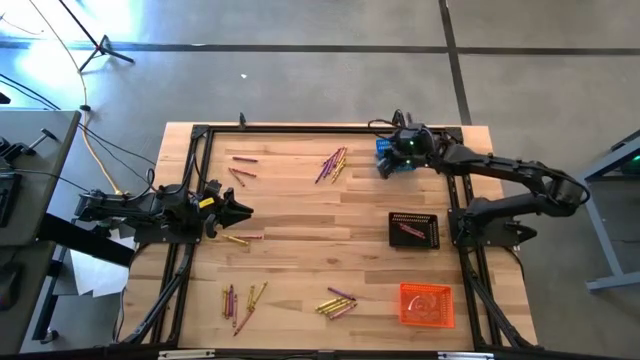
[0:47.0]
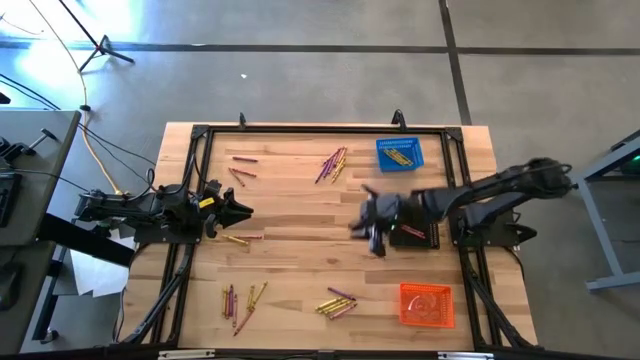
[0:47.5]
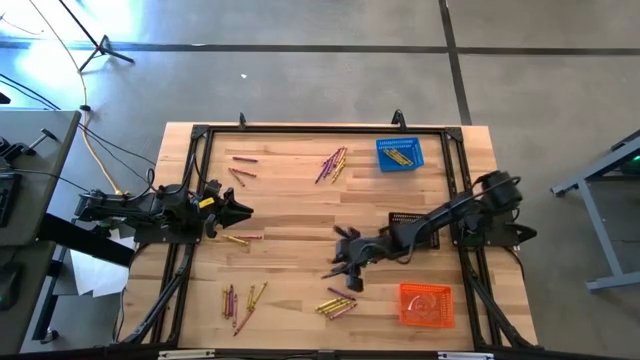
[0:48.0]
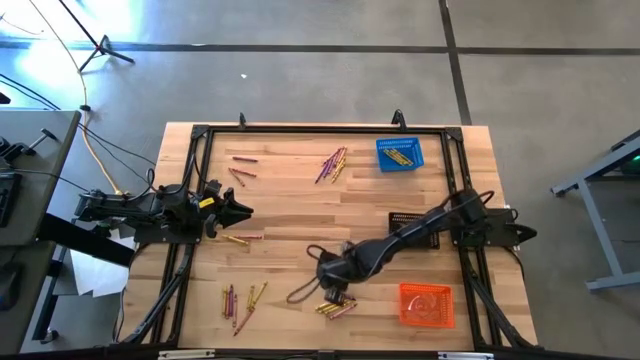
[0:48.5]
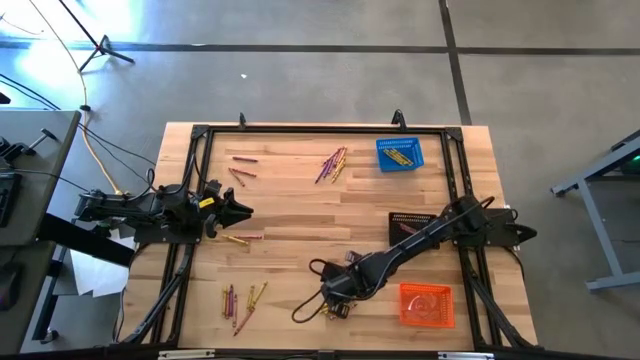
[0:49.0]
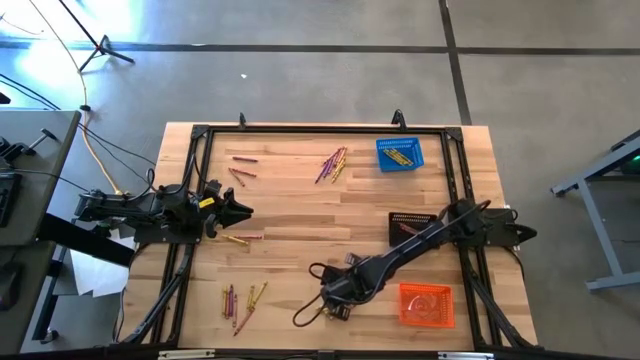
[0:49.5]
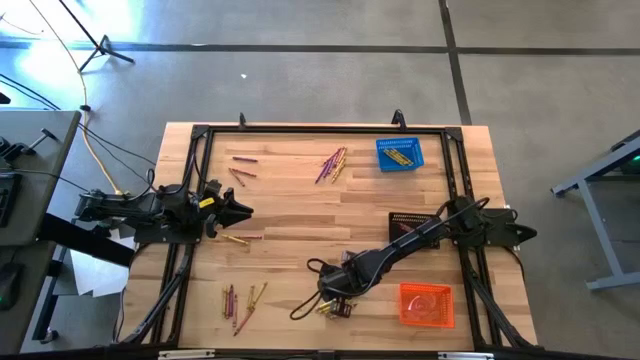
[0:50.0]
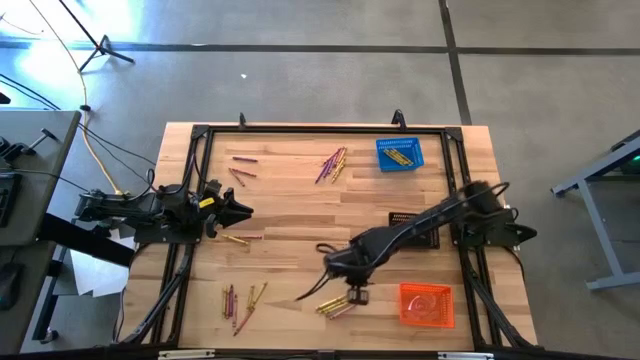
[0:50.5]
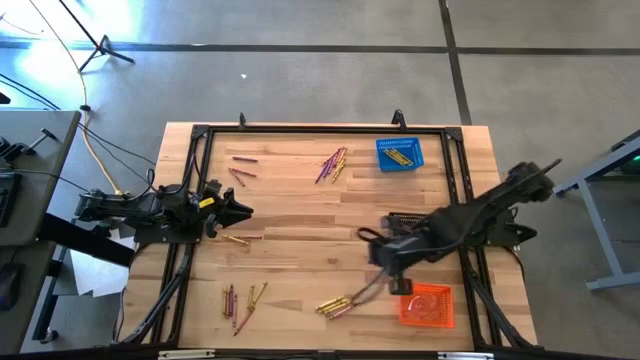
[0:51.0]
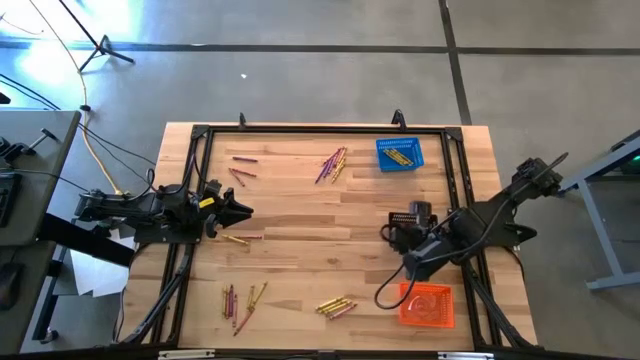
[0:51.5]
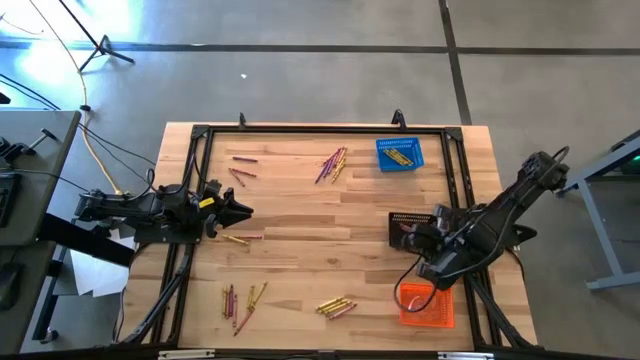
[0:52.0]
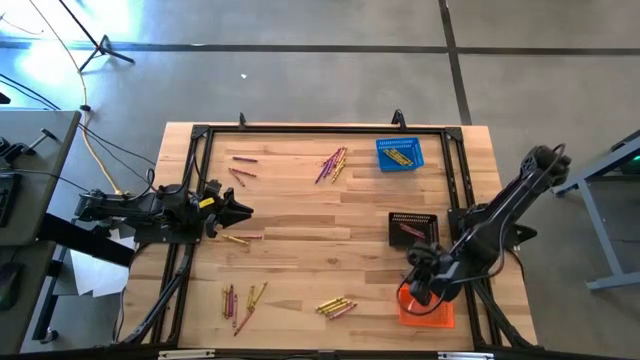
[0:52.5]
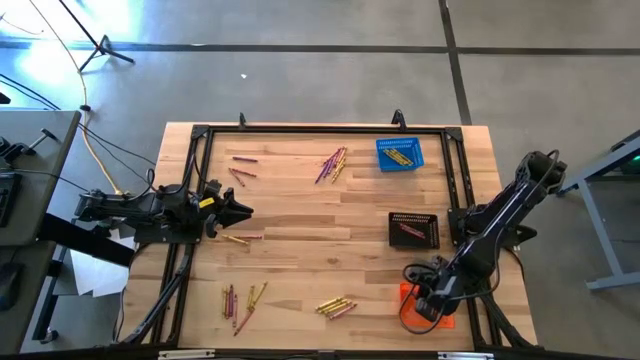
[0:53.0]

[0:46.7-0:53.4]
Task: Sort crayons
Put the violet crayon into the orange bin

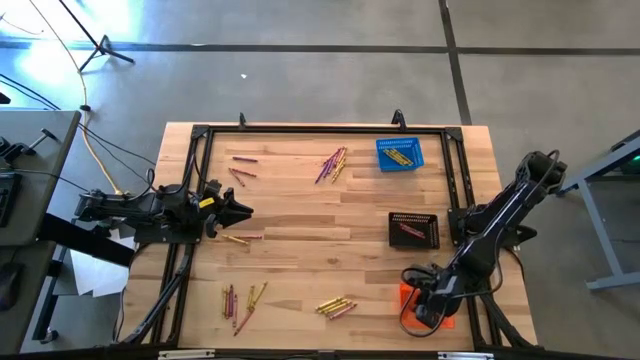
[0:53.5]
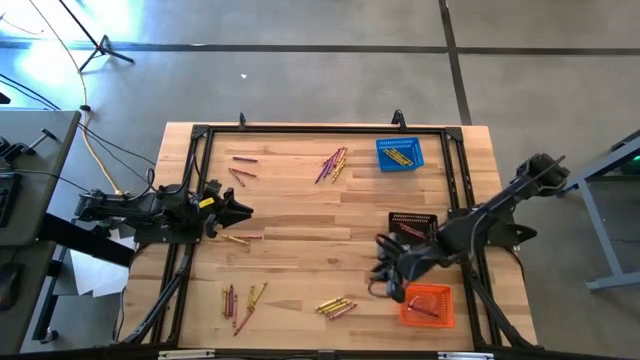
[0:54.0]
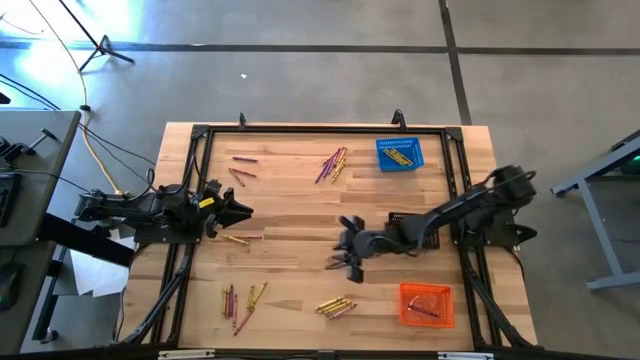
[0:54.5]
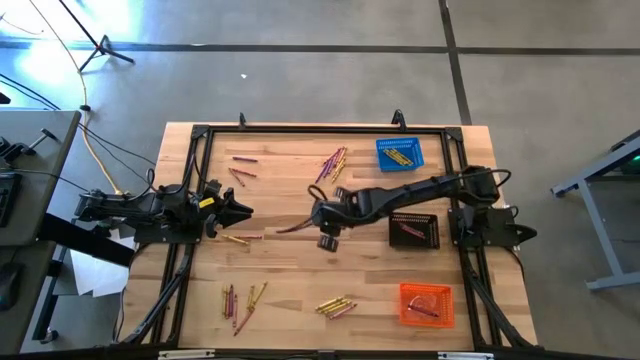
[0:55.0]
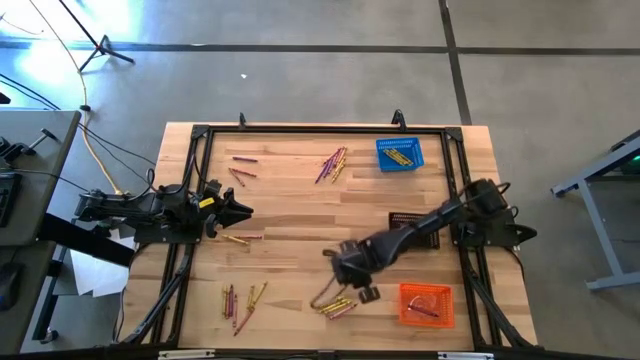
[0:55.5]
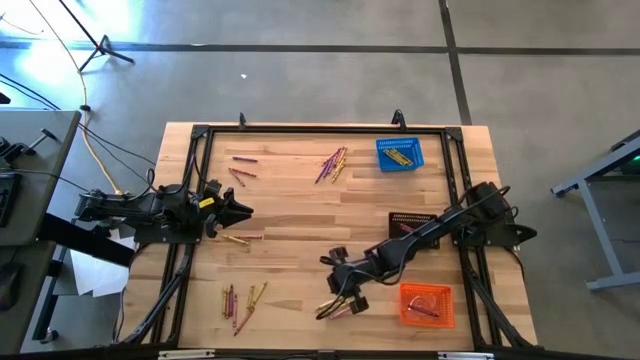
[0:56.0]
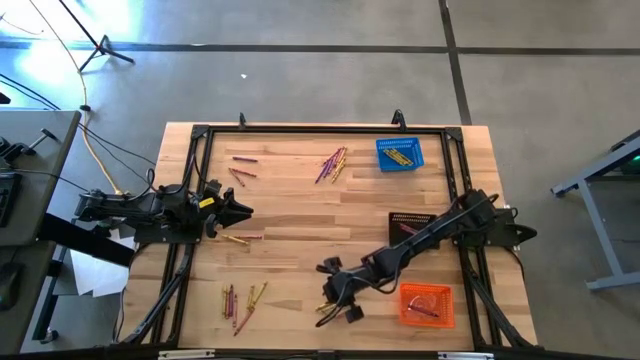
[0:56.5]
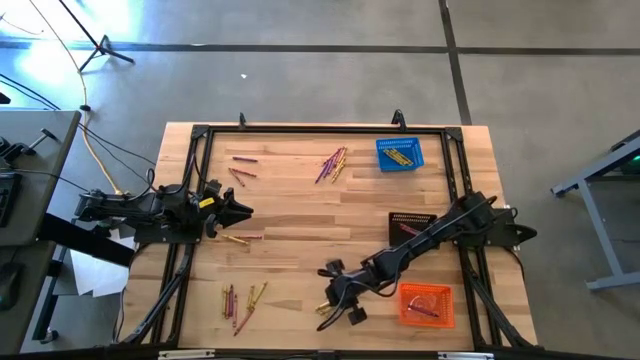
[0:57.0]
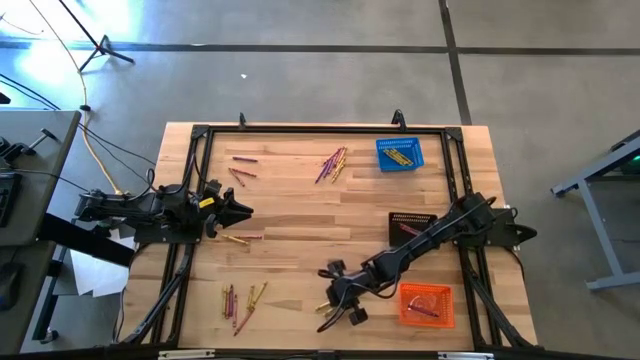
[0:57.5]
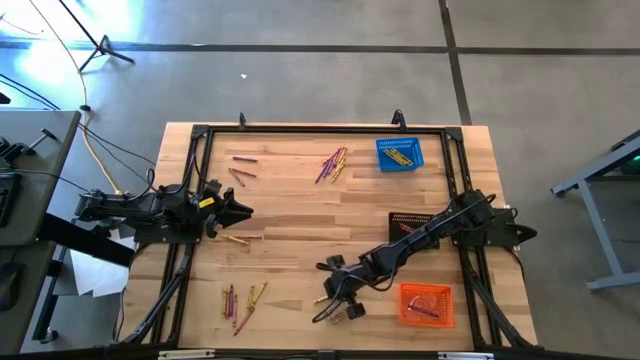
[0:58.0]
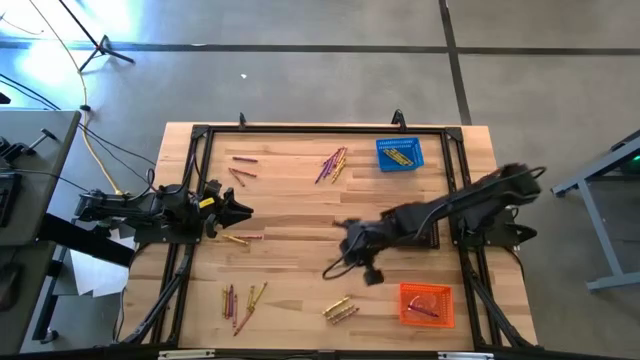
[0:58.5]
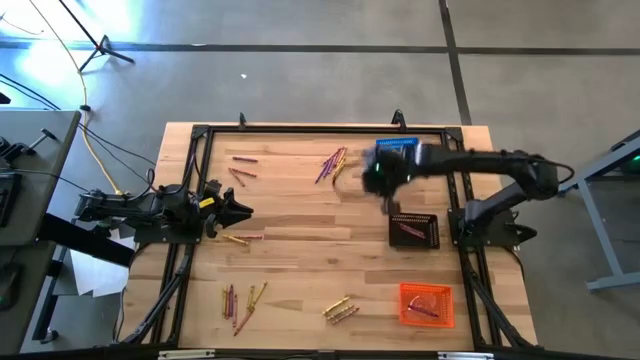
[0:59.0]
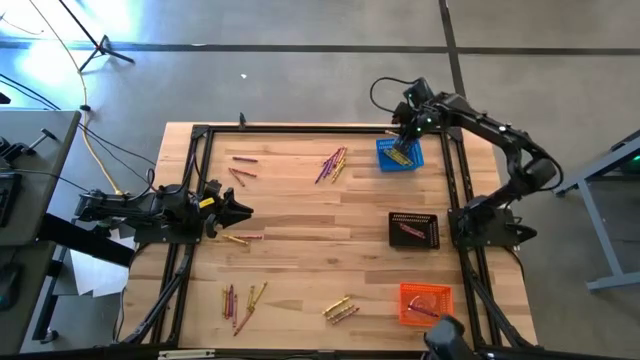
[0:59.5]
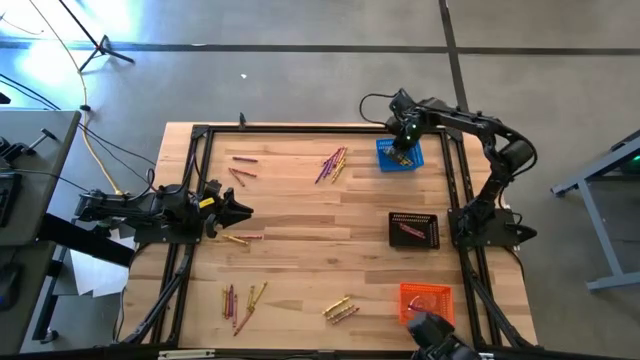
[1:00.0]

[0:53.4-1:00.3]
Put the yellow crayon into the blue bin

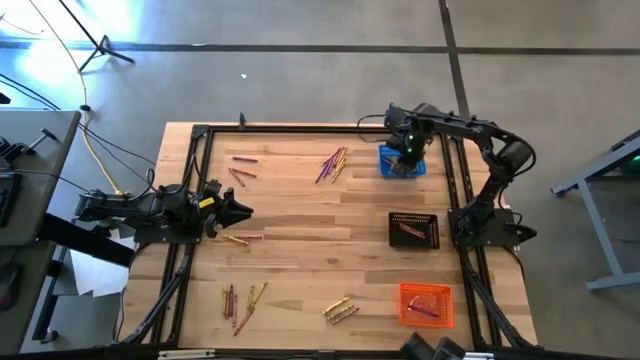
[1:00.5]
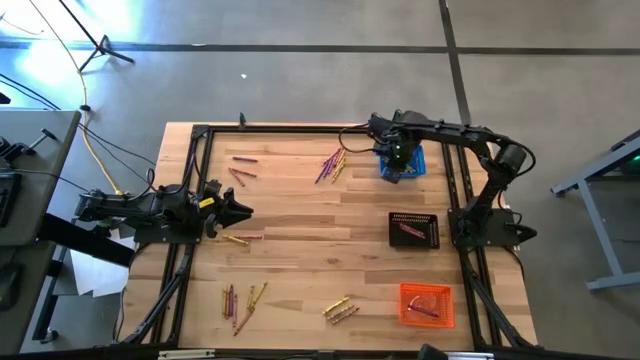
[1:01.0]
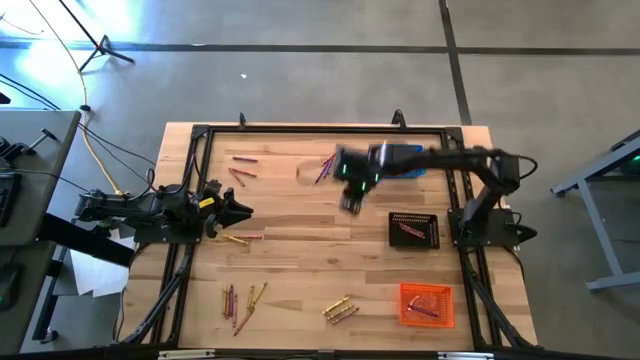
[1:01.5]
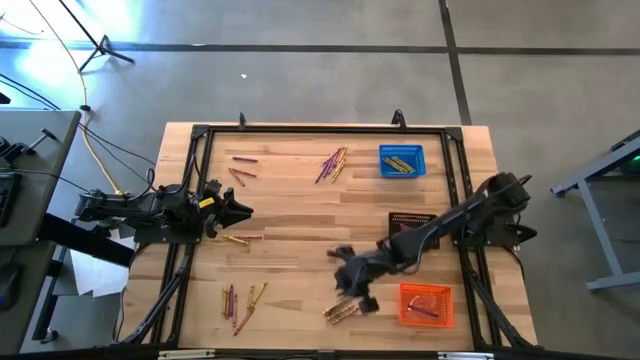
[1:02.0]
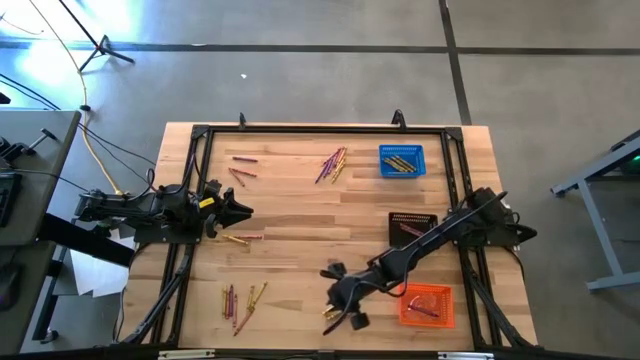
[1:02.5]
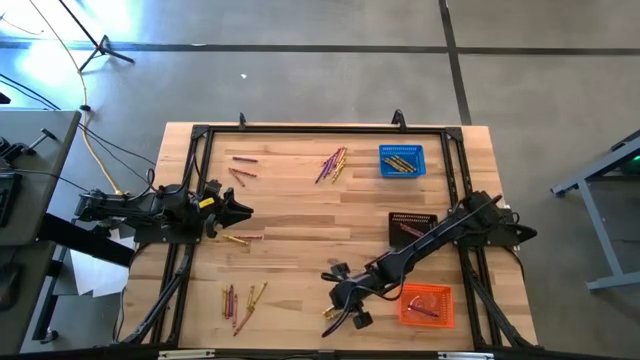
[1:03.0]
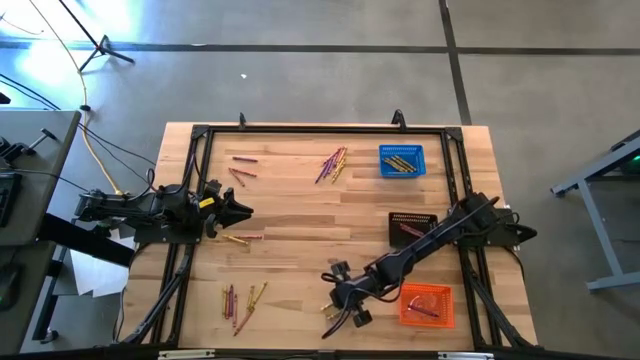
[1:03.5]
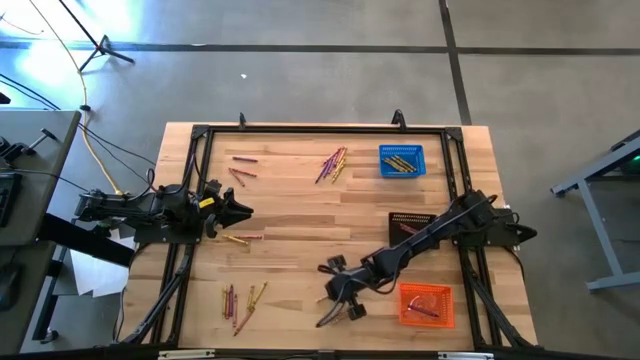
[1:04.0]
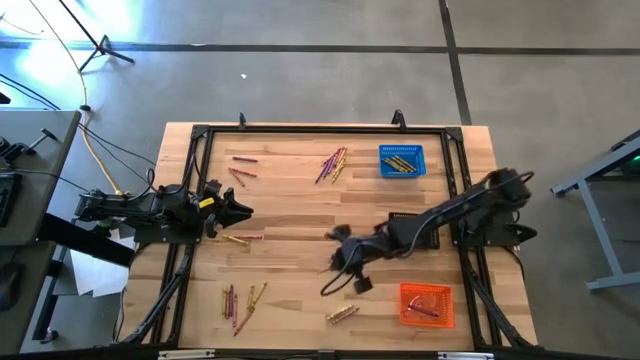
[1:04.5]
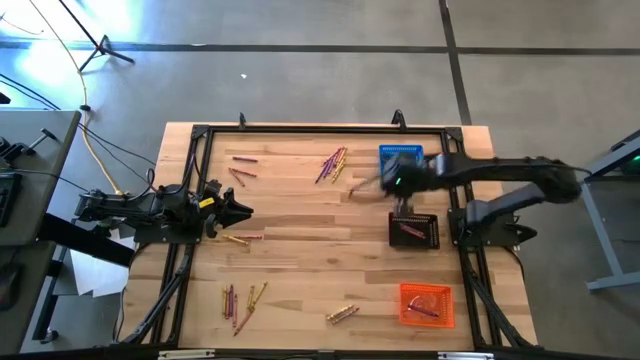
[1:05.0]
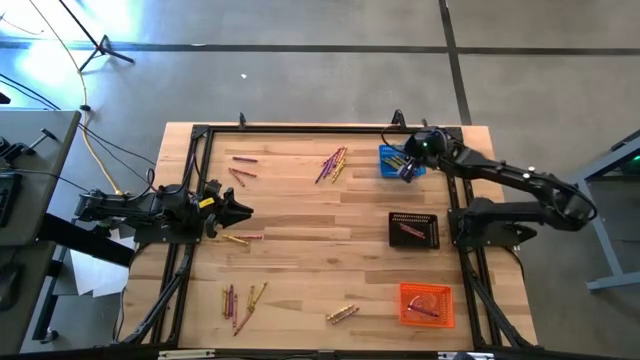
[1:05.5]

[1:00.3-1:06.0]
Put the yellow crayon into the blue bin

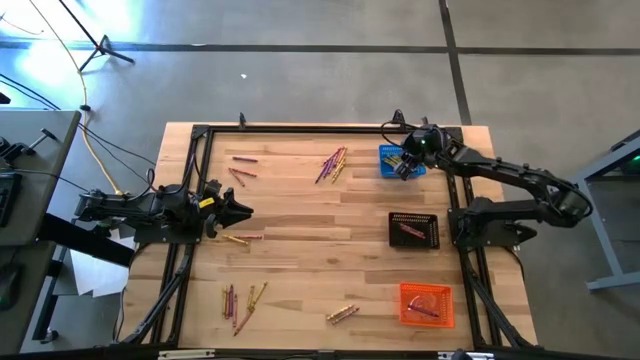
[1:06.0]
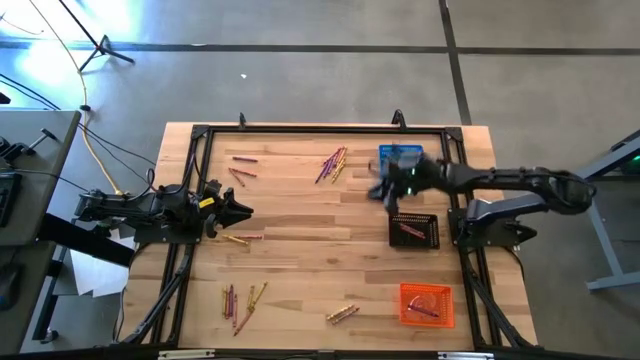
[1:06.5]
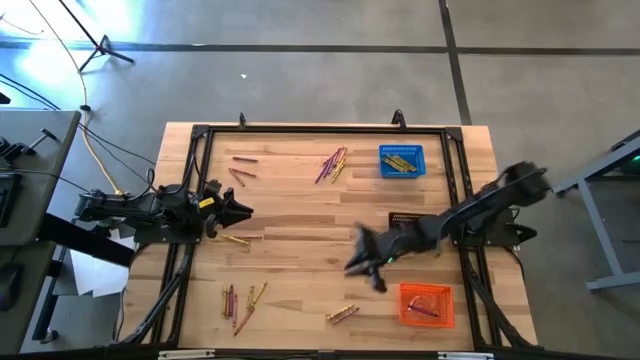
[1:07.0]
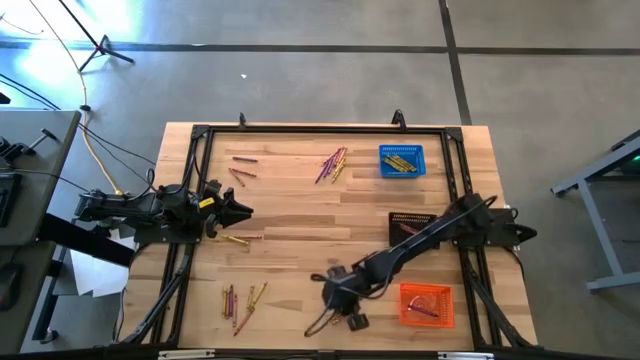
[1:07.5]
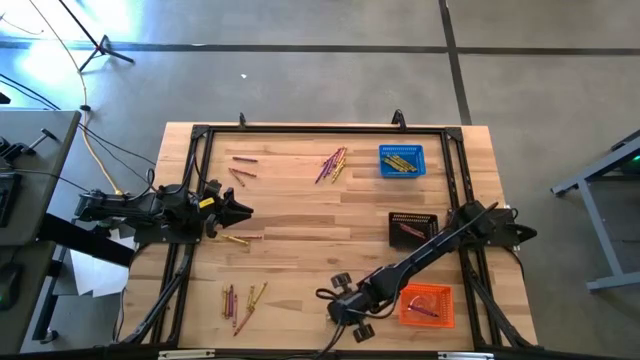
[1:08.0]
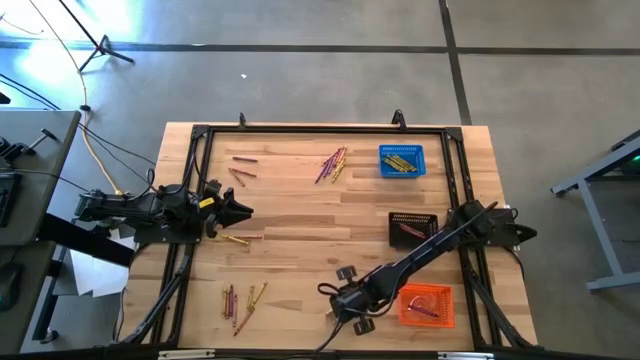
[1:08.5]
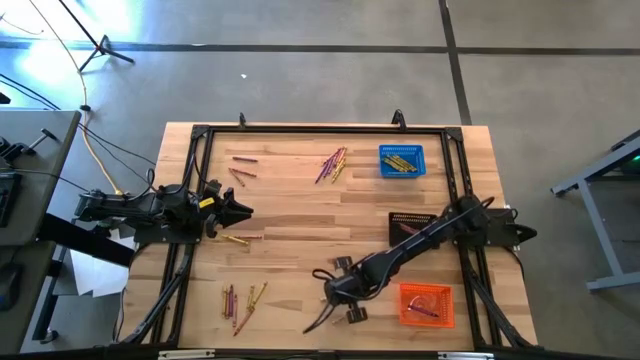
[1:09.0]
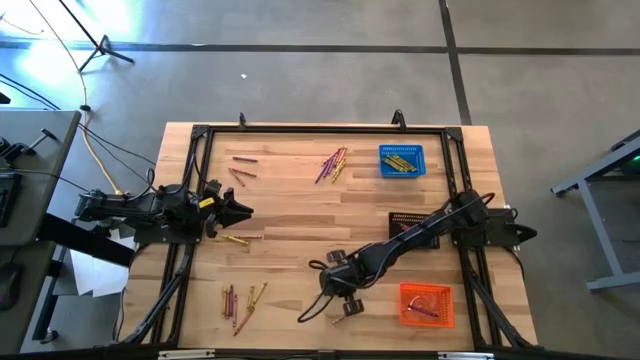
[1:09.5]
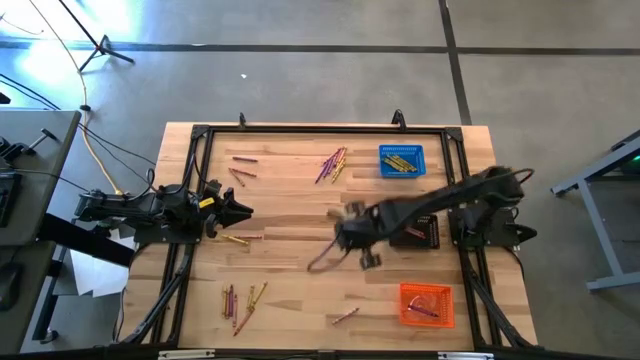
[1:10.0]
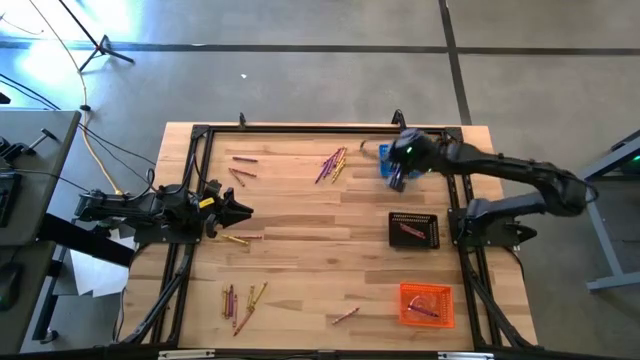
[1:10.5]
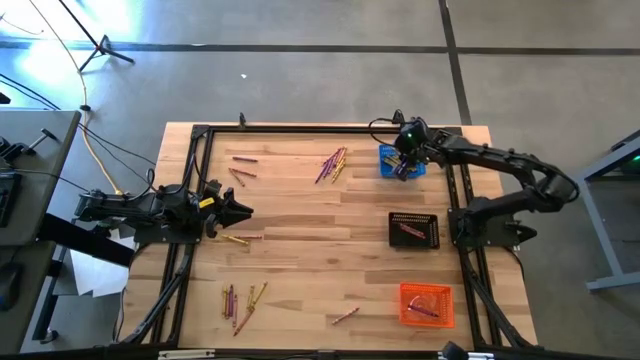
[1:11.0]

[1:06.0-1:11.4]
Put the yellow crayon into the blue bin
